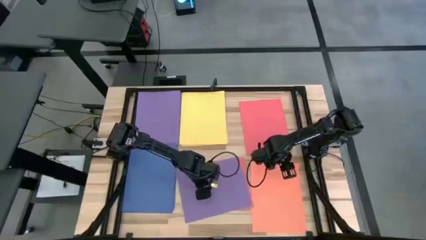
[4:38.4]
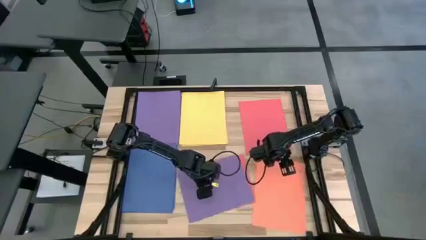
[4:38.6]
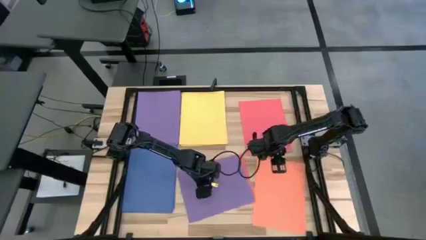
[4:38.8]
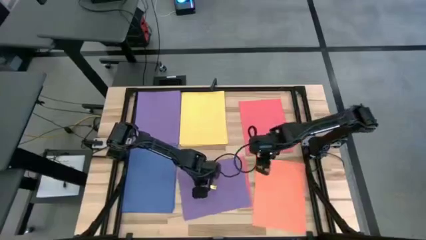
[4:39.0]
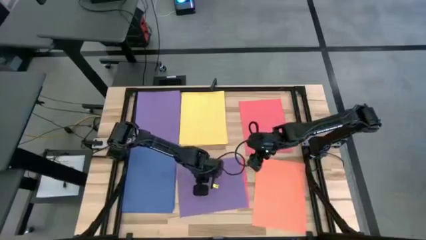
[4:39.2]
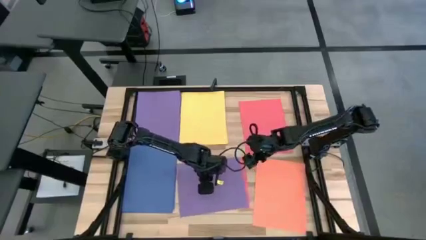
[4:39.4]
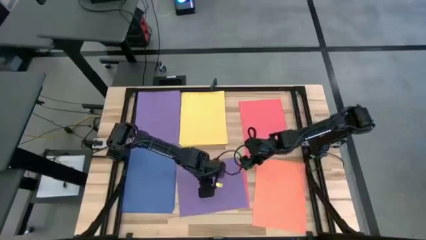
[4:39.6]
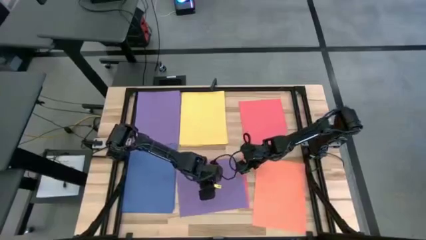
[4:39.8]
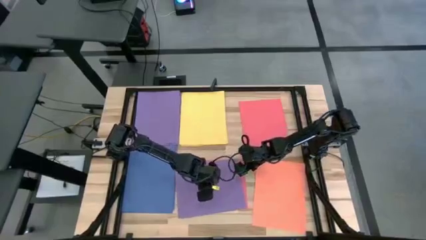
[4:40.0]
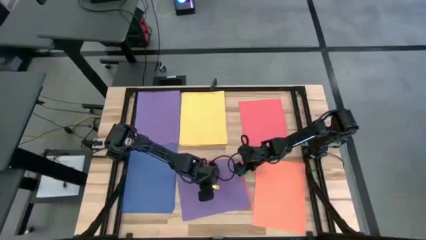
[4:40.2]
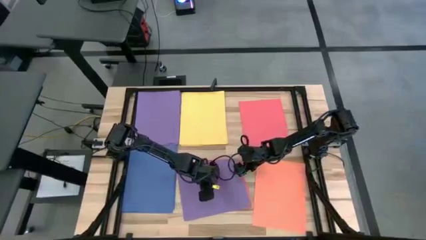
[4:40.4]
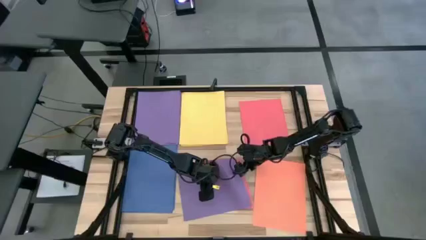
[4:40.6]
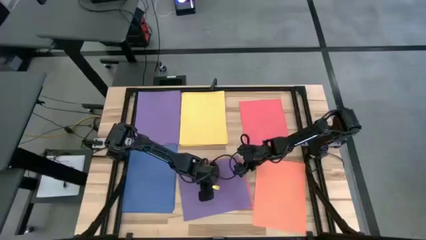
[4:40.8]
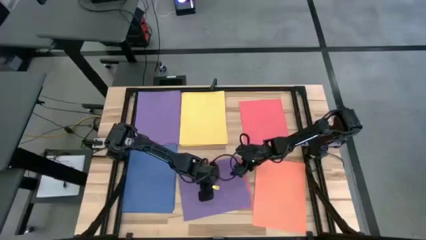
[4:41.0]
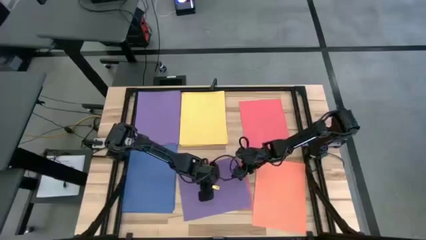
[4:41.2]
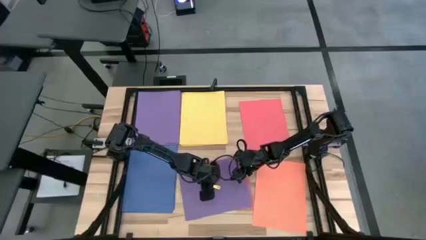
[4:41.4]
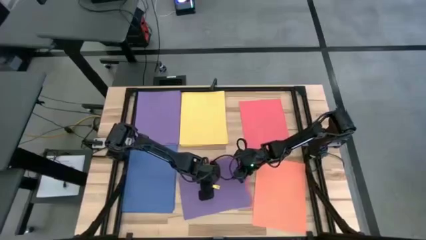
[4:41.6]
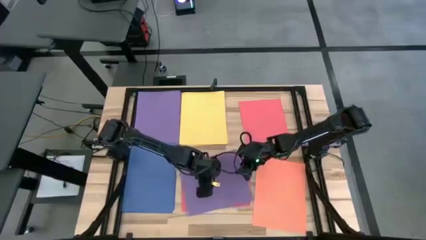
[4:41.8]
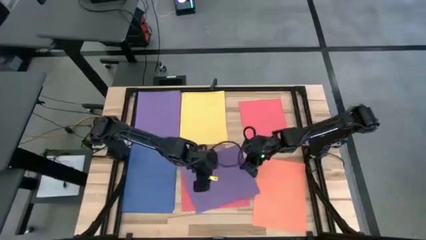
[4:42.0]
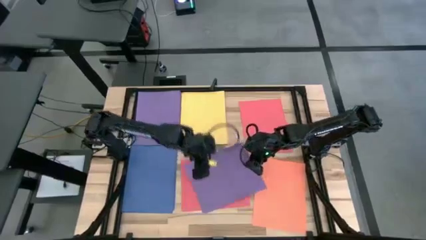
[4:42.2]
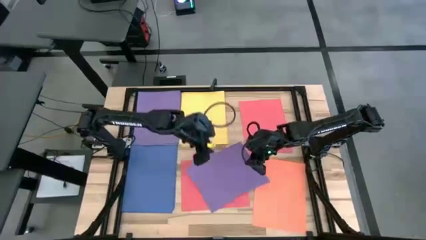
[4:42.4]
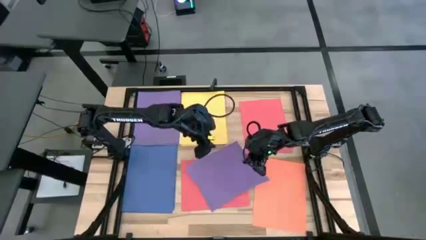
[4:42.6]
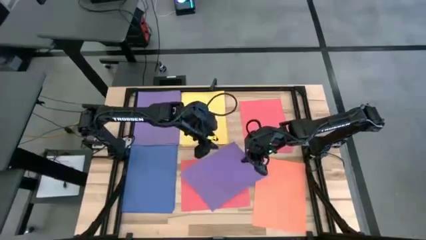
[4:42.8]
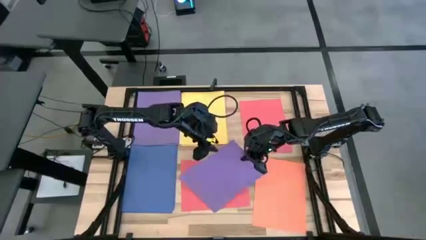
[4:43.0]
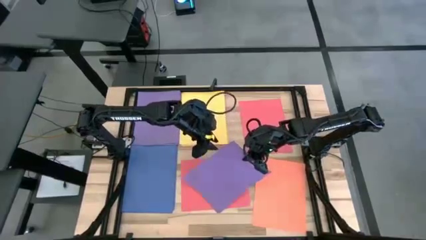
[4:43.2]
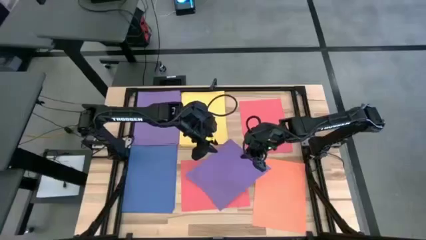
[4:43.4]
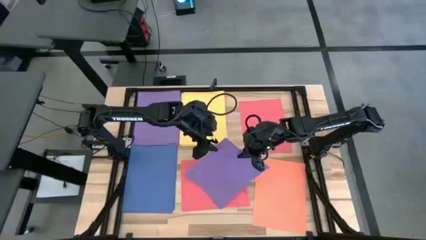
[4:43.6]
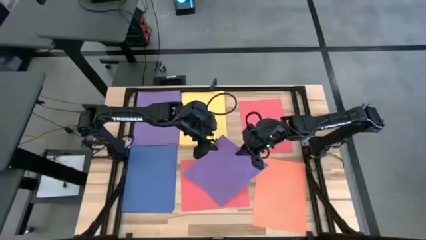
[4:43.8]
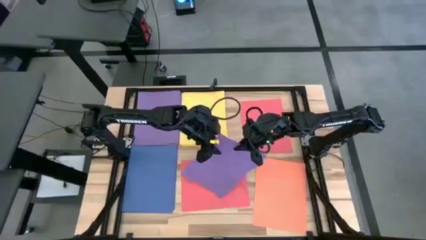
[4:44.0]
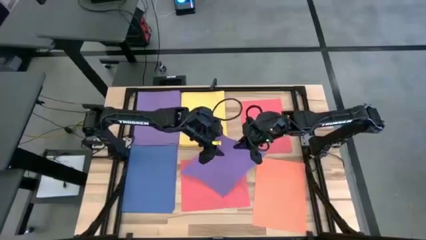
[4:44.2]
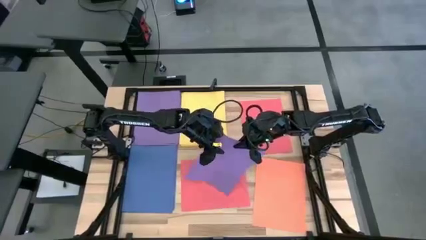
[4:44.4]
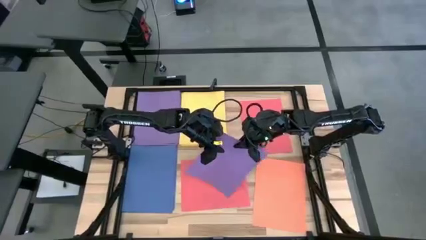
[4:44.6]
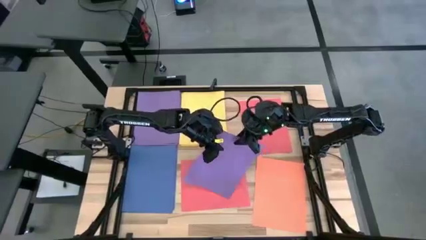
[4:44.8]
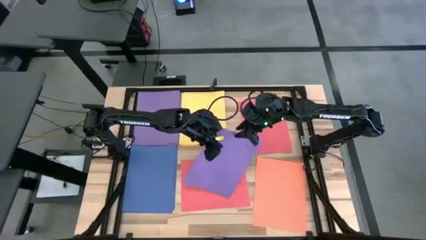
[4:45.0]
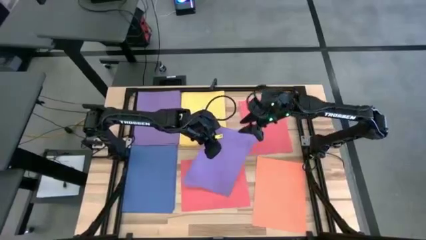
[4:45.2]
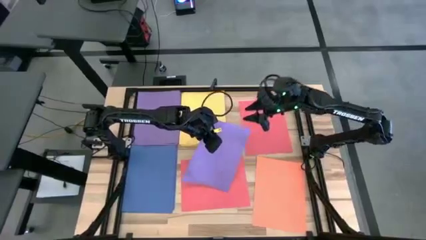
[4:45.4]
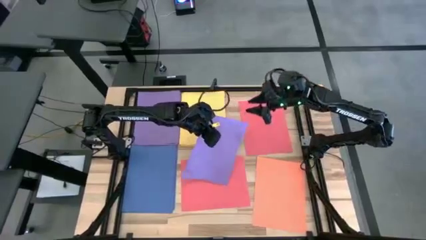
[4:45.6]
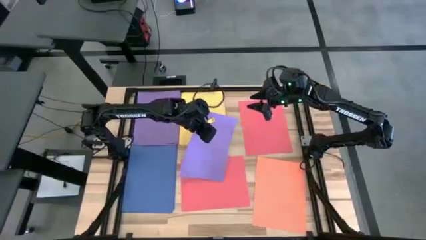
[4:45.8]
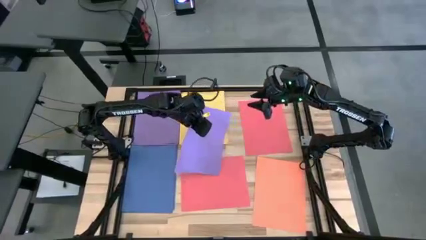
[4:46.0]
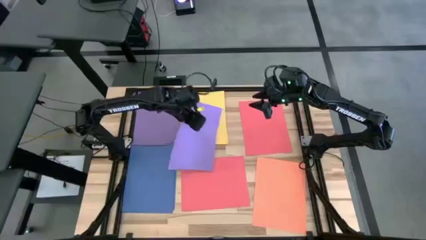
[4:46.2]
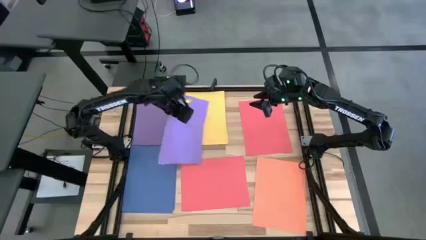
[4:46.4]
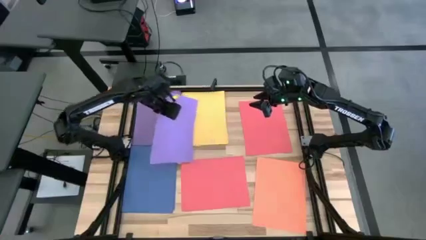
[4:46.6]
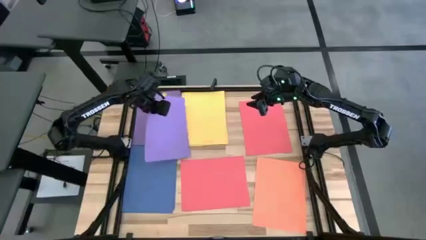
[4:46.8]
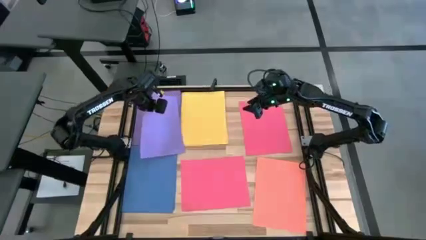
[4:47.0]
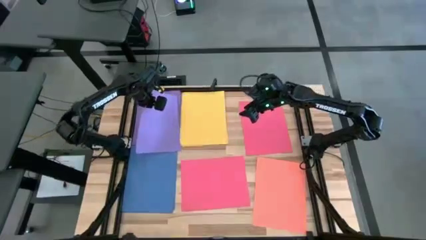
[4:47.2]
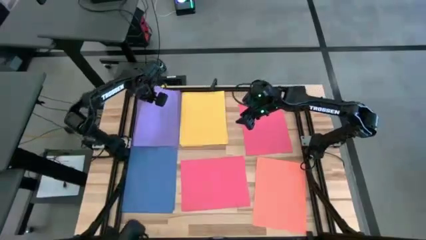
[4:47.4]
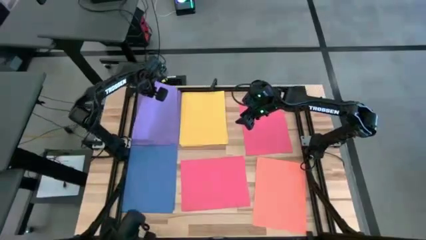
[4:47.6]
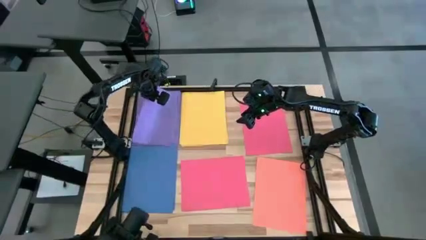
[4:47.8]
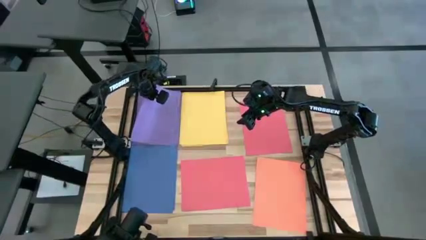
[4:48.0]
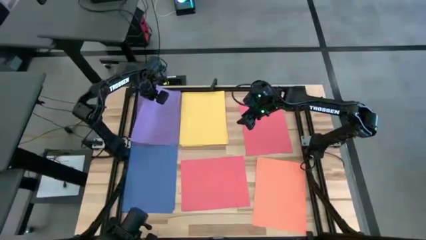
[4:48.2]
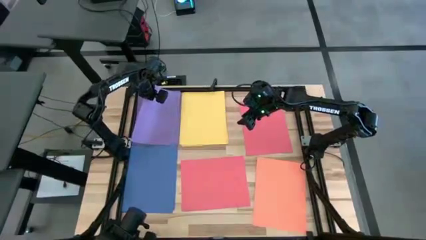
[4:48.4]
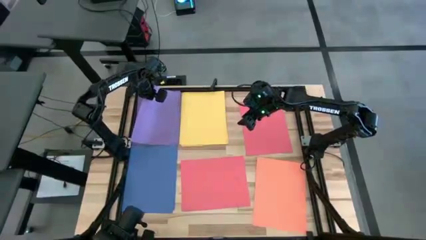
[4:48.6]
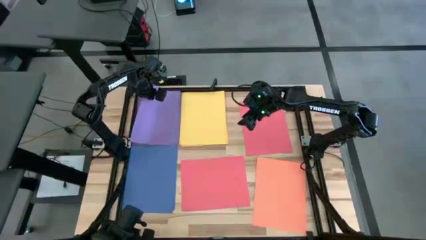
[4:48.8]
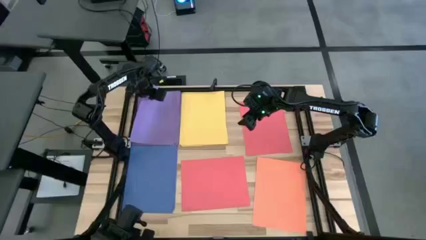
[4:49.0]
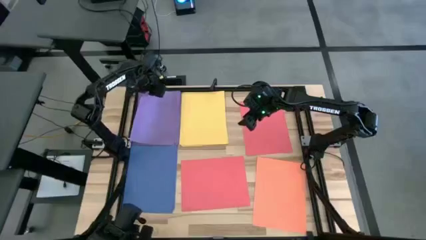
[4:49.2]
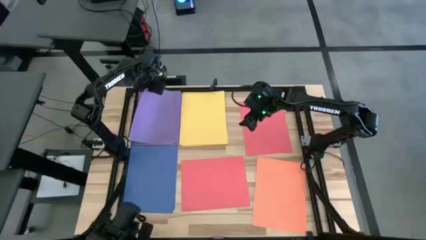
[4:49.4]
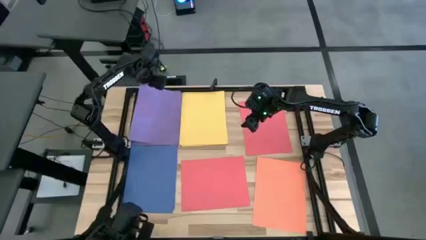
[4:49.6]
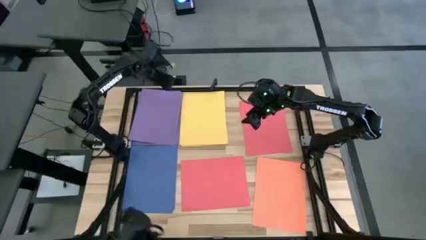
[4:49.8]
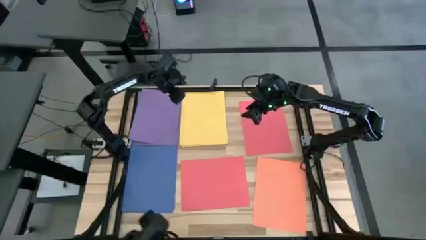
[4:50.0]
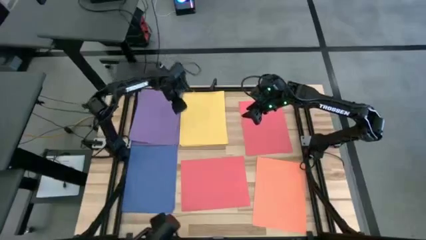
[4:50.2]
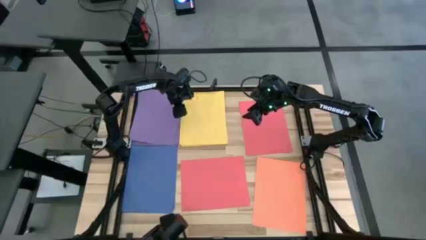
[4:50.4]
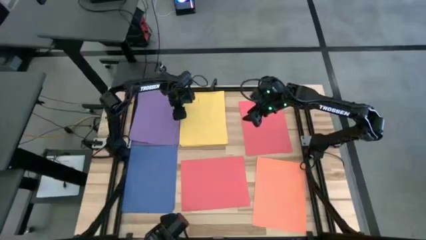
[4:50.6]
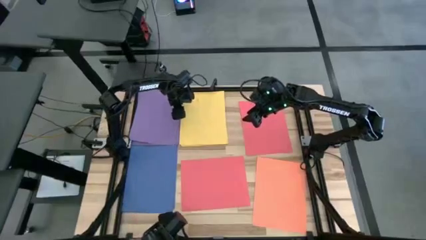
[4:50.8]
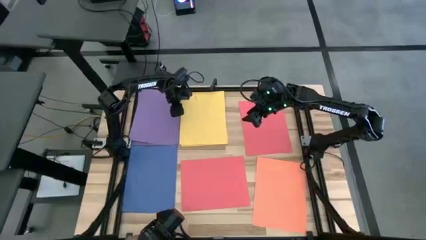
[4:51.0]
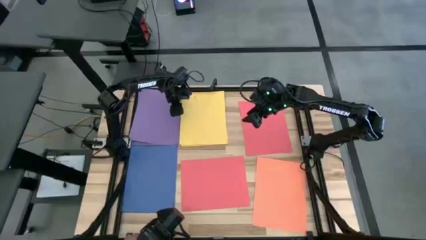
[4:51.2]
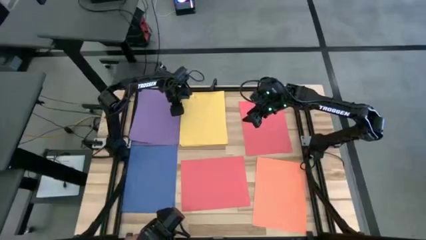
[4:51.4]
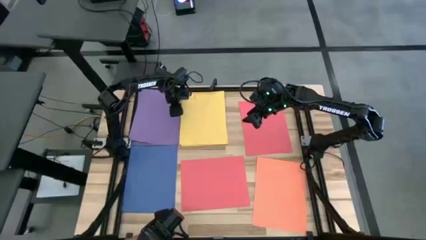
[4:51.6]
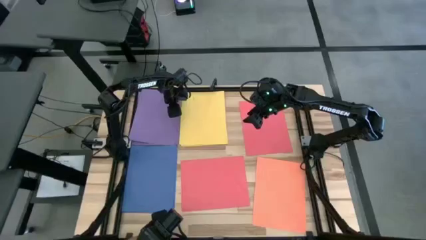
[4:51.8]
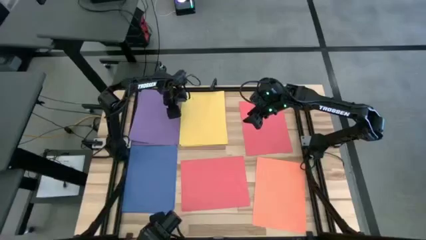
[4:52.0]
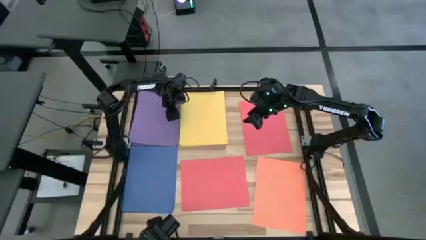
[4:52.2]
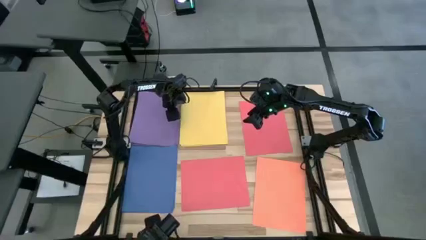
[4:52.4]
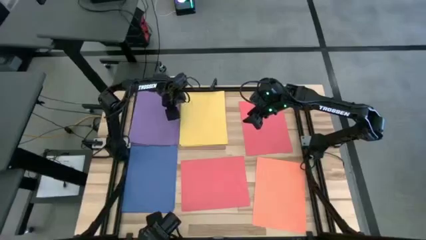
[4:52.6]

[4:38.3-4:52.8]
Task: Organize paper
Stack the purple paper on top of the purple paper

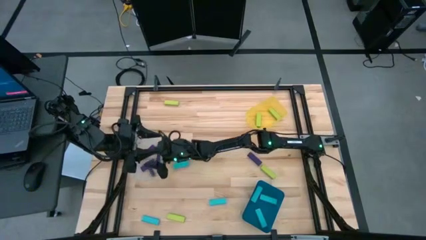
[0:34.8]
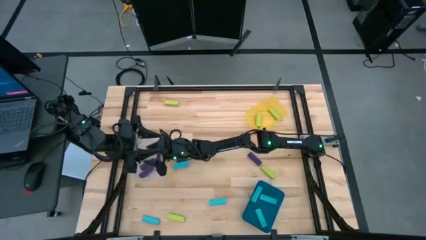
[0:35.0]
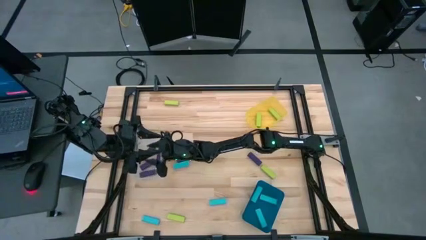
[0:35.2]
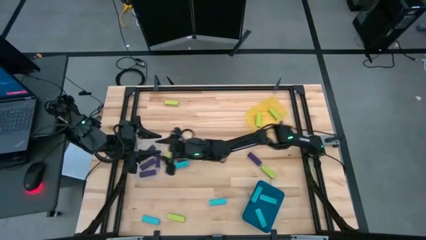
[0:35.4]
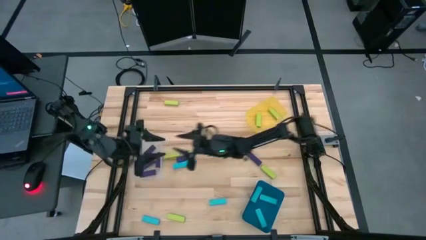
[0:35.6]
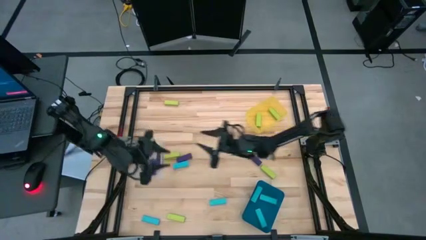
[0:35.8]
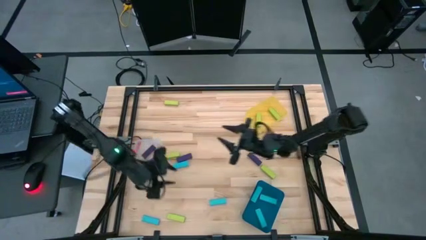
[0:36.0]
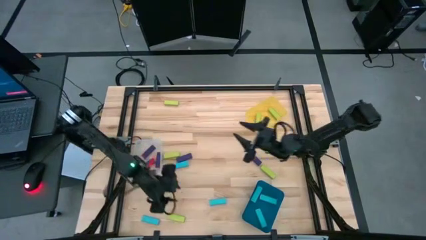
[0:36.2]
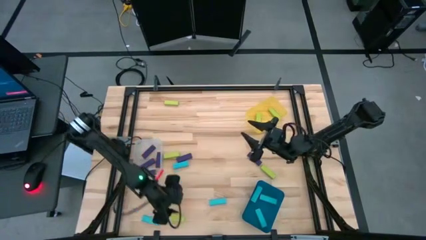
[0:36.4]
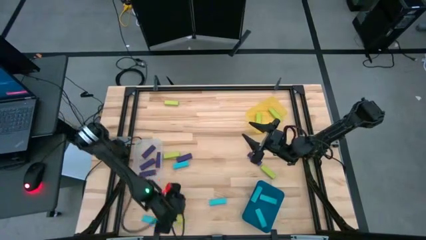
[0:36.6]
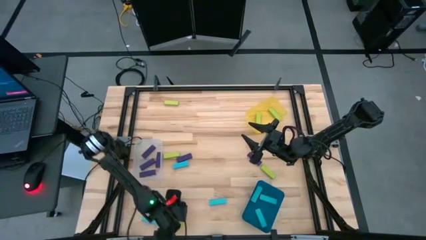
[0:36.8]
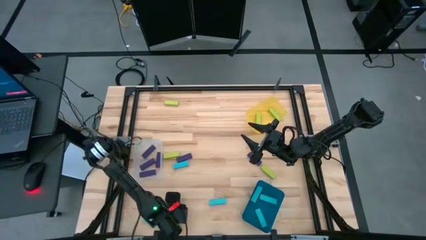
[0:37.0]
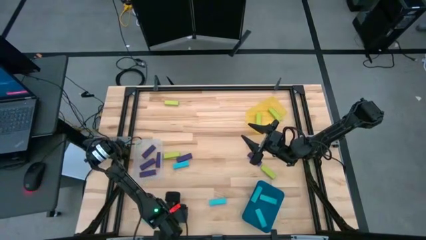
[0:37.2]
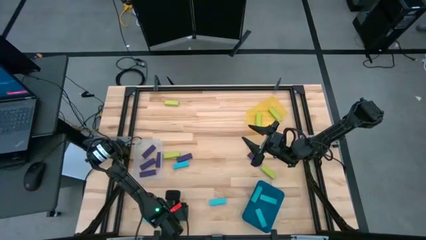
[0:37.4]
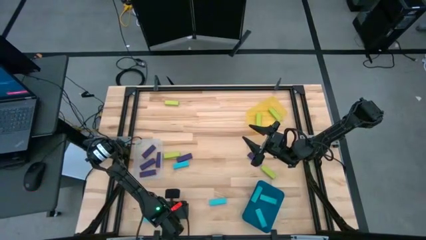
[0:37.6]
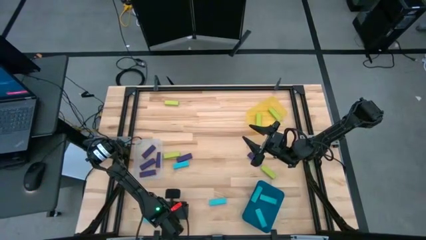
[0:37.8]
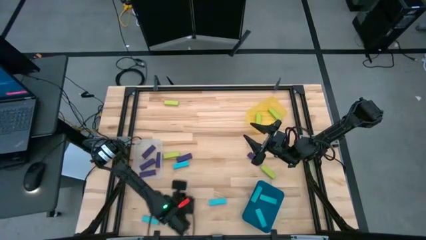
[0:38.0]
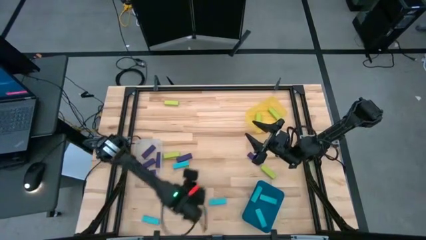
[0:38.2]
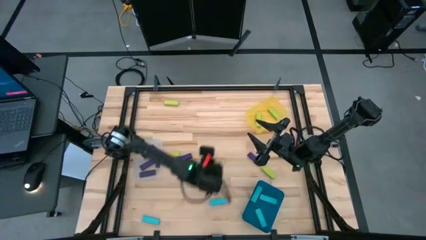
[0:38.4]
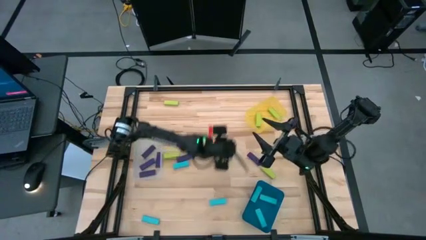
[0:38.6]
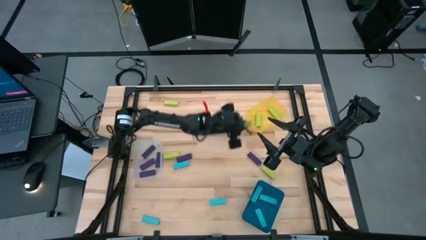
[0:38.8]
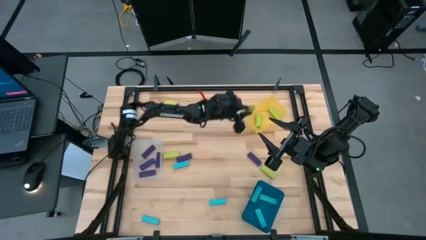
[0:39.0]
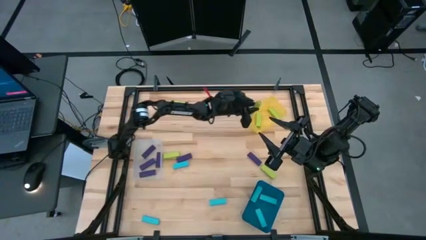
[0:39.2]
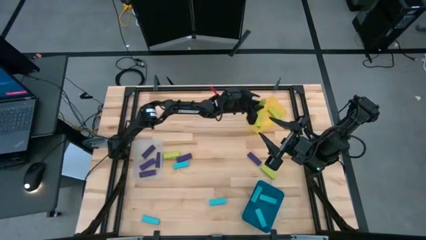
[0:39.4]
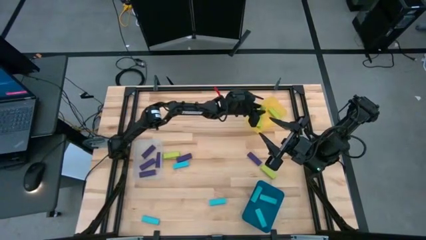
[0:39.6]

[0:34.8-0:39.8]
Task: Sort blocks
Put the green block into the yellow bin
